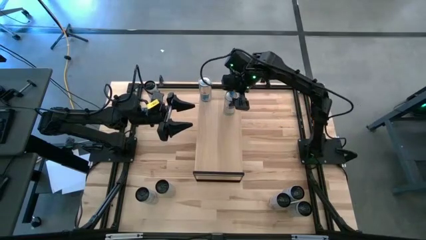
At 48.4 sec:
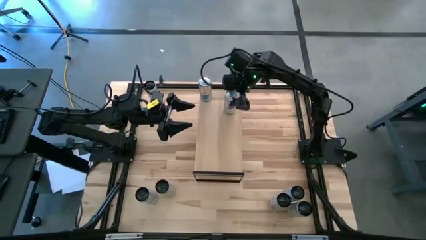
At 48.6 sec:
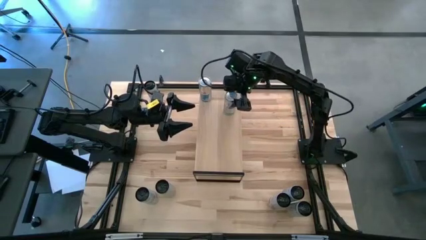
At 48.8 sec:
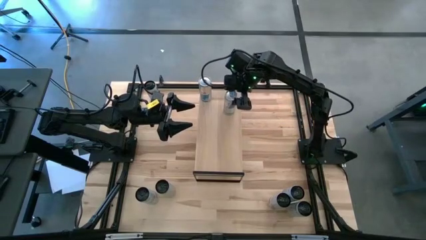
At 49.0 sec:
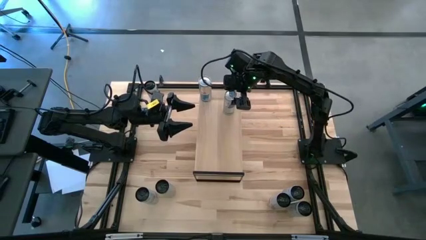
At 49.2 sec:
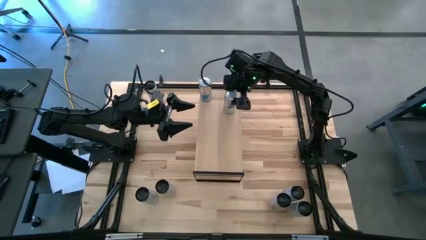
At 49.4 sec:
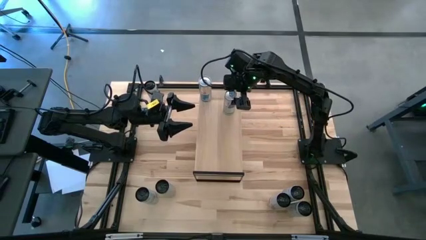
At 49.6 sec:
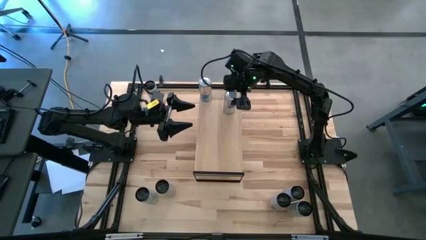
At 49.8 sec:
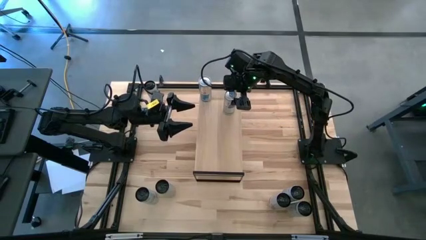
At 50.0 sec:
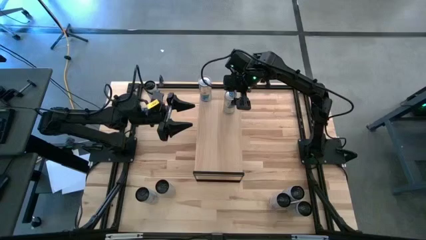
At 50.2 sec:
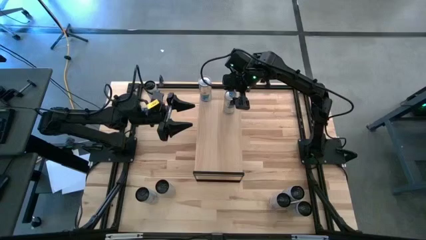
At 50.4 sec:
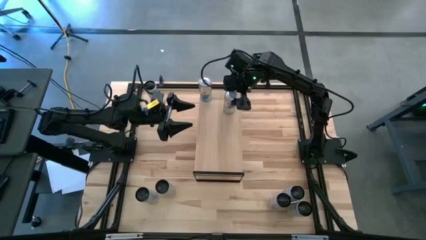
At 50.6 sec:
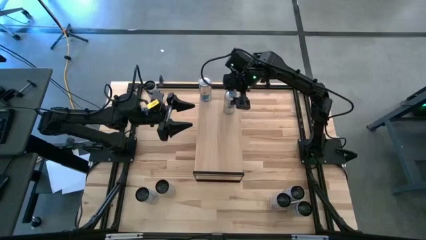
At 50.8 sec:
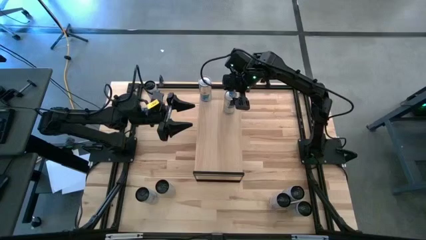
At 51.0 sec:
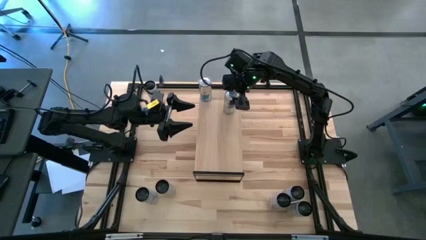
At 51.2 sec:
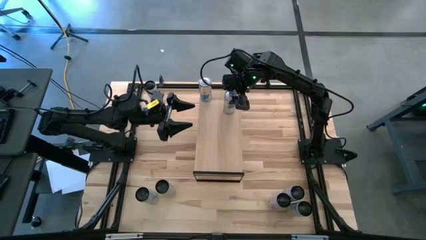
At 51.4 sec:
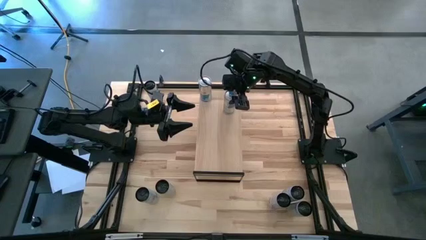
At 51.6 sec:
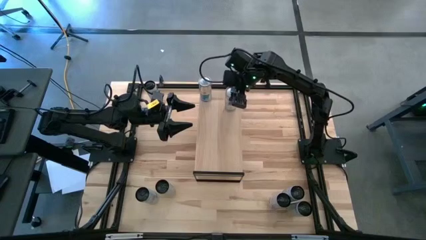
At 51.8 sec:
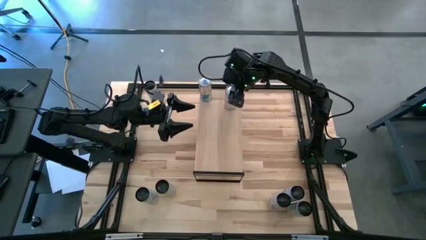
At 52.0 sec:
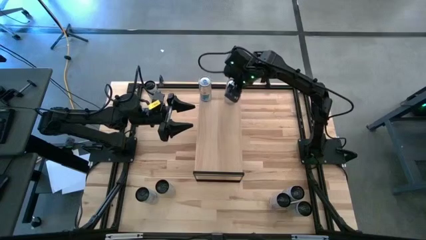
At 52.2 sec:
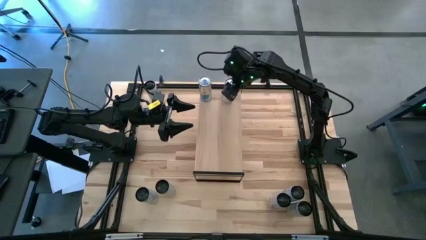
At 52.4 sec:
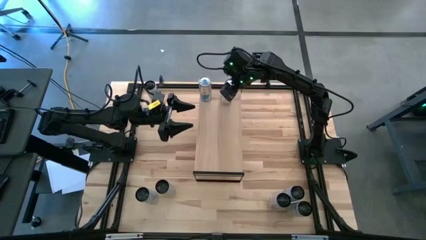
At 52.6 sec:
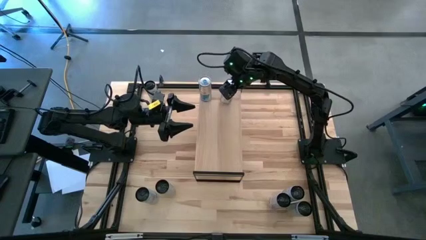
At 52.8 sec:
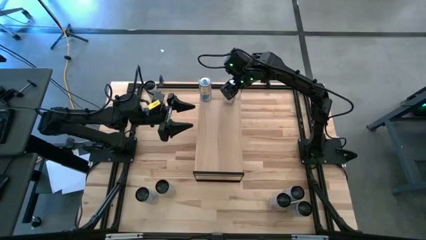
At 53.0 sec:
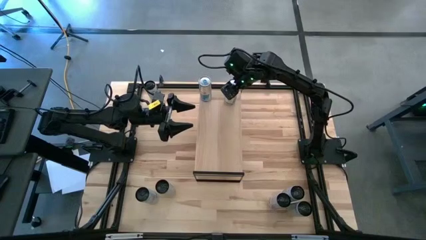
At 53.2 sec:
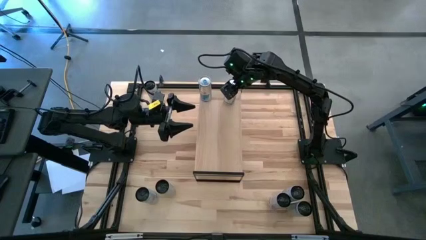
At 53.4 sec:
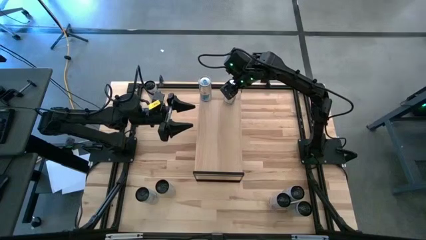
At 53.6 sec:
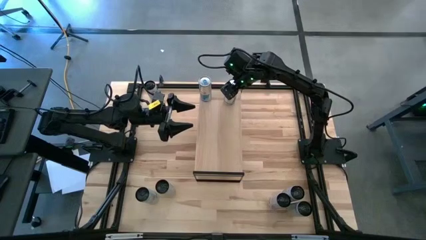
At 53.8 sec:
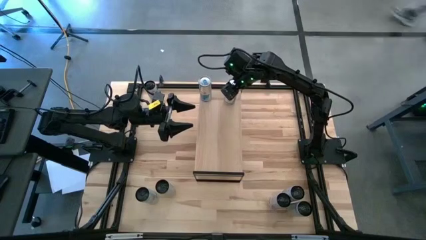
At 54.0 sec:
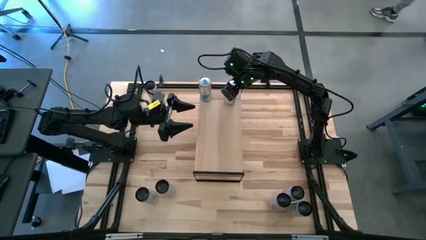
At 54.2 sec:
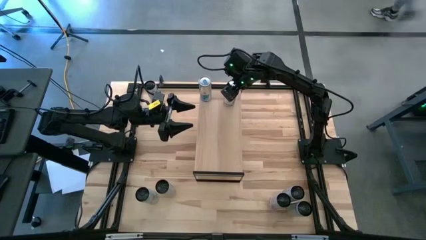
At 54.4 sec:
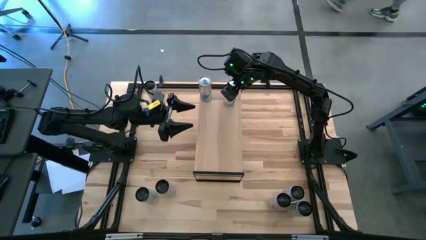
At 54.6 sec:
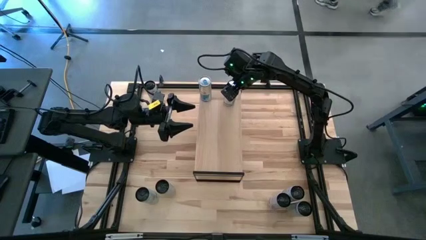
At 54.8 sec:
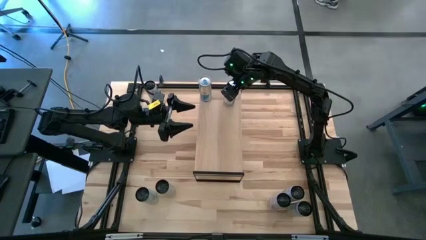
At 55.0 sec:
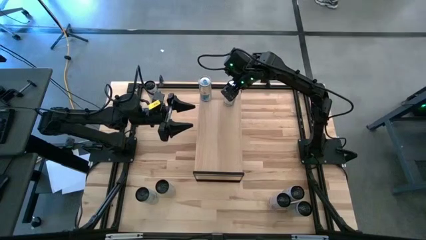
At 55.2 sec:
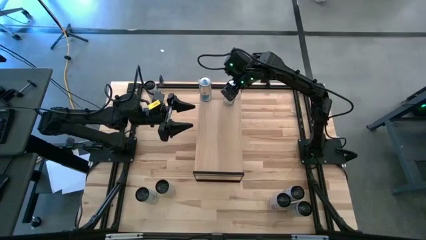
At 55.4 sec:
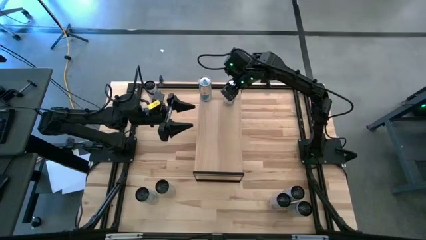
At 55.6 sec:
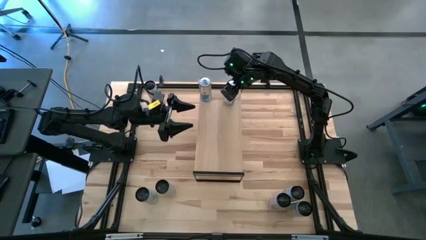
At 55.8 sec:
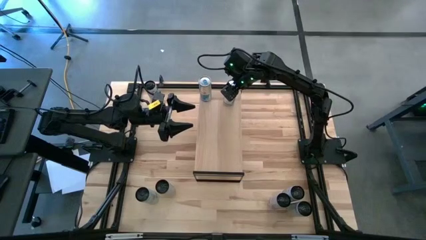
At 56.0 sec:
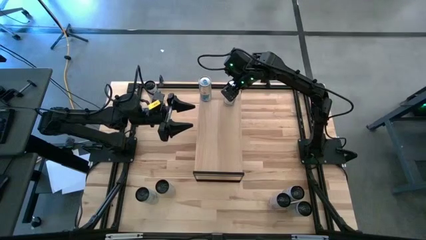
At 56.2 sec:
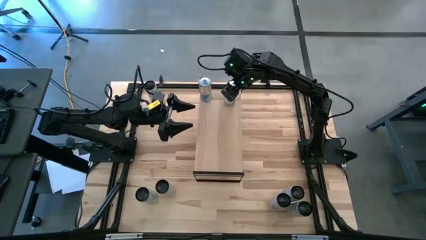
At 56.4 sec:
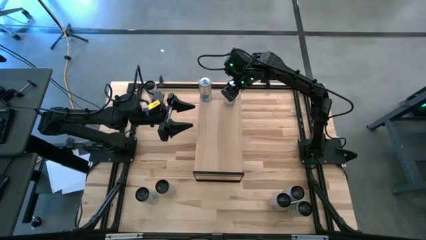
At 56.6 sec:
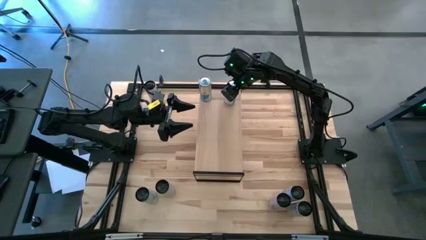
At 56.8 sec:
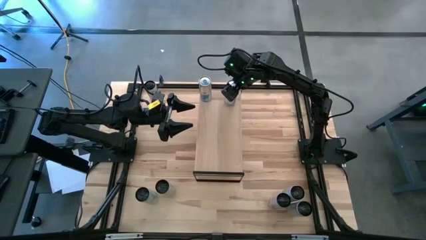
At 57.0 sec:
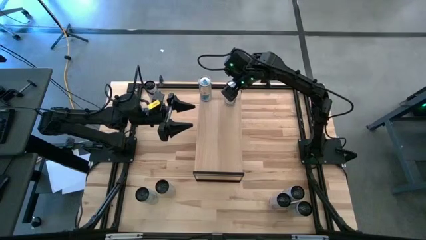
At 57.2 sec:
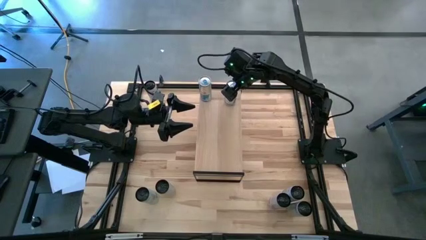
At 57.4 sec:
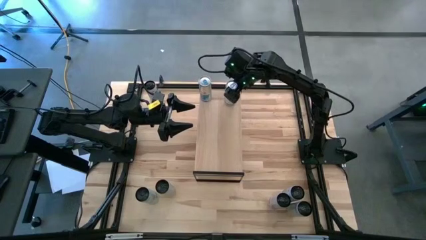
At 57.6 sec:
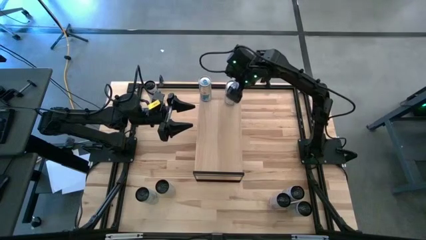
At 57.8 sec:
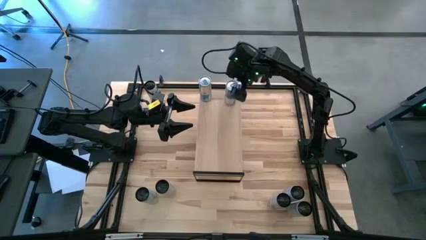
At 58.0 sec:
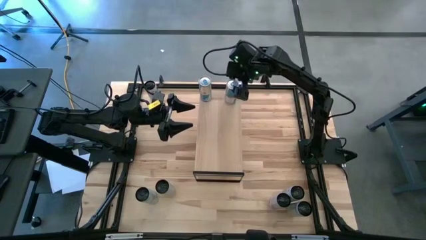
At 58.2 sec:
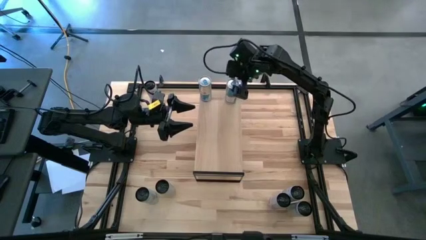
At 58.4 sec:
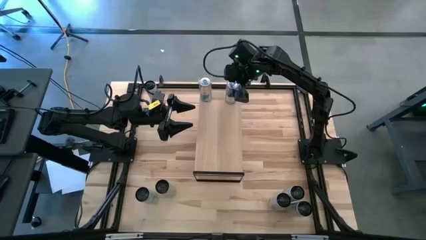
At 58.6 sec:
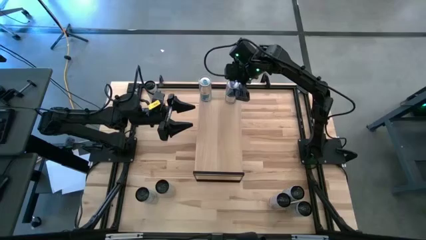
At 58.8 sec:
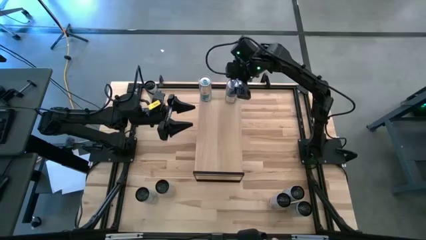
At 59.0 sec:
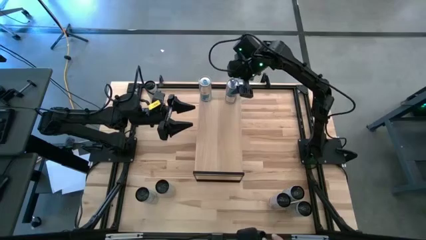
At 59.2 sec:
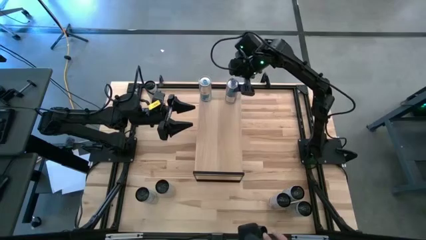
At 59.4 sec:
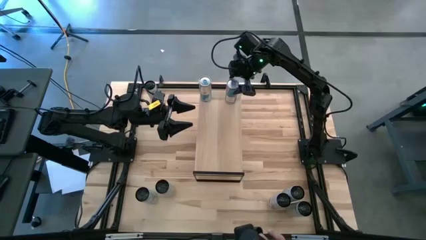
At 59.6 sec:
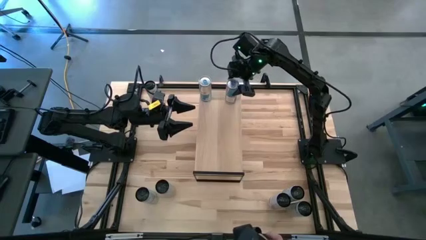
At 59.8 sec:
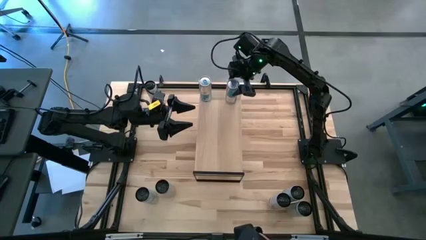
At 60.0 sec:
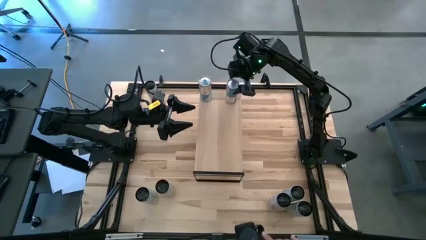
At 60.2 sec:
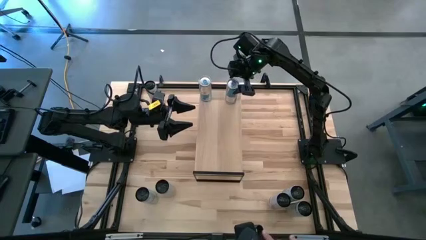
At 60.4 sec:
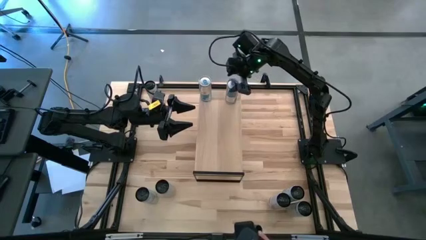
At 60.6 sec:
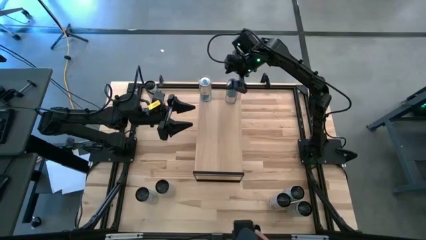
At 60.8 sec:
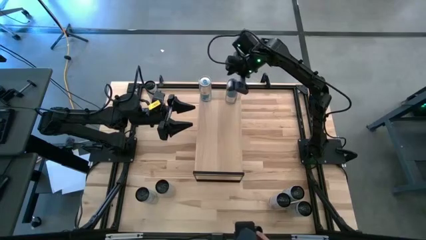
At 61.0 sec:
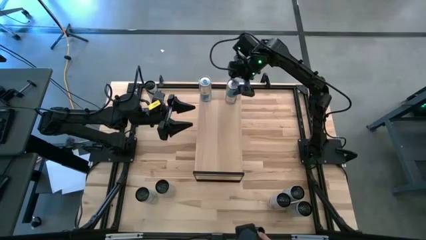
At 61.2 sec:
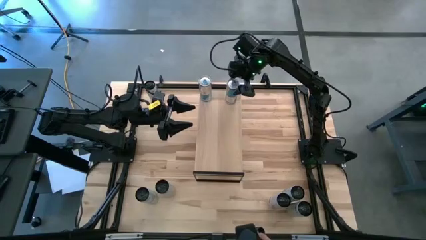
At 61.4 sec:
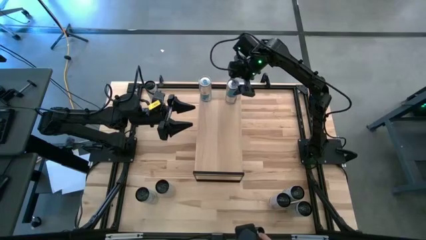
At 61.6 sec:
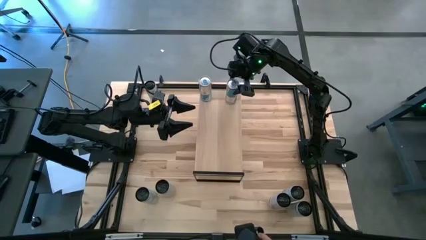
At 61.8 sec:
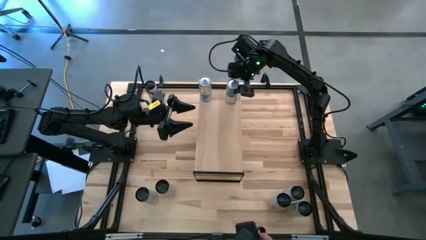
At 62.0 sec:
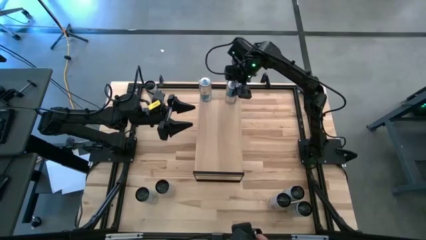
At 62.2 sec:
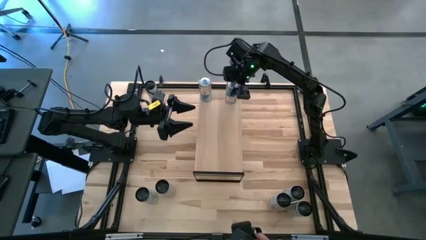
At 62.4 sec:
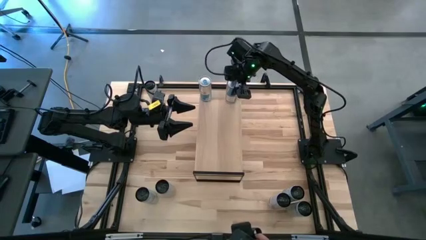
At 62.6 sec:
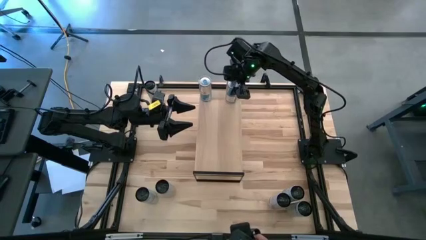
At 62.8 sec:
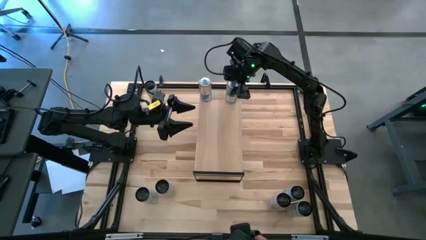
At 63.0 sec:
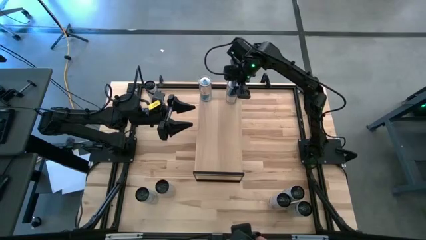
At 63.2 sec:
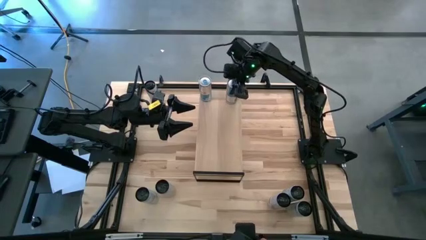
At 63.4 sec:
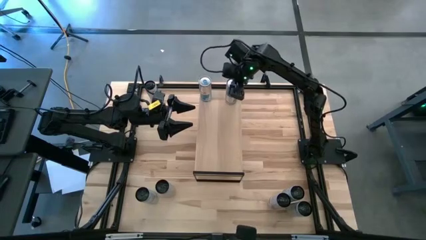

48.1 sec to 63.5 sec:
Task: Place canned beverage on shelf
Put the blue soda can on the shelf aligned with the other blue soda can
